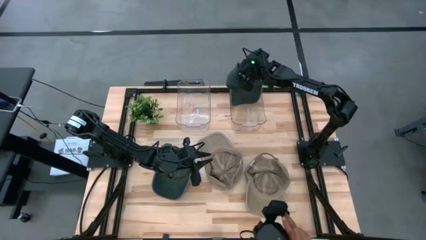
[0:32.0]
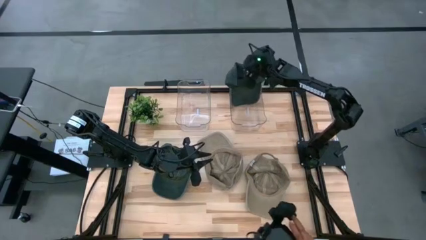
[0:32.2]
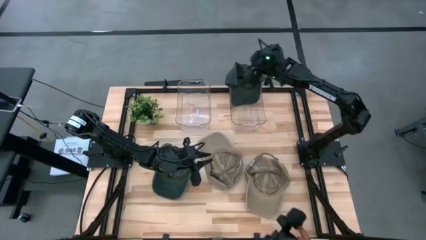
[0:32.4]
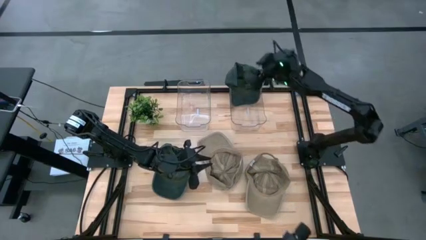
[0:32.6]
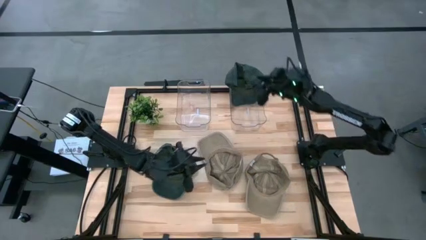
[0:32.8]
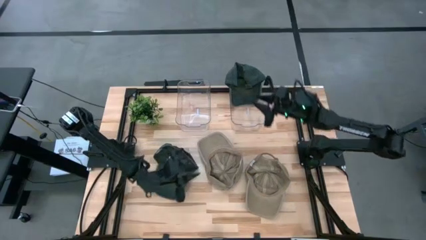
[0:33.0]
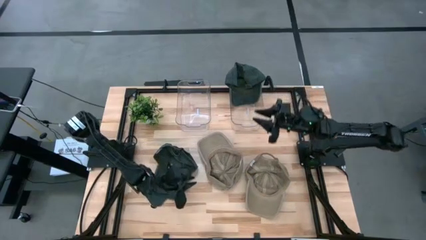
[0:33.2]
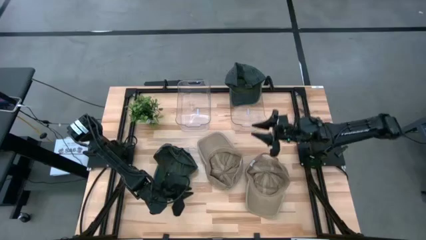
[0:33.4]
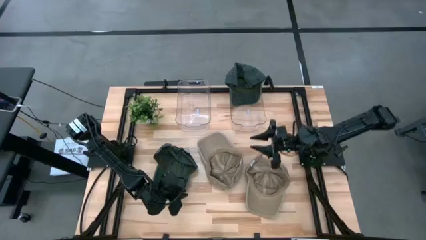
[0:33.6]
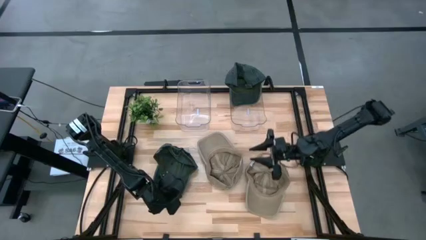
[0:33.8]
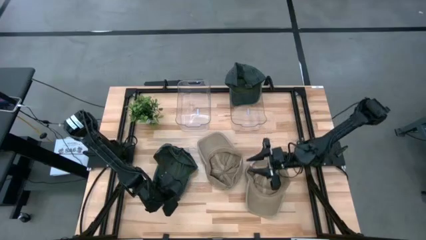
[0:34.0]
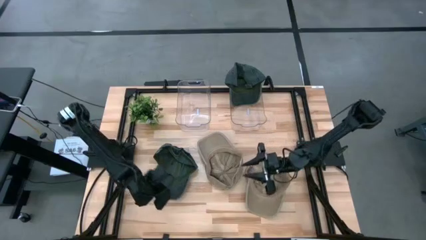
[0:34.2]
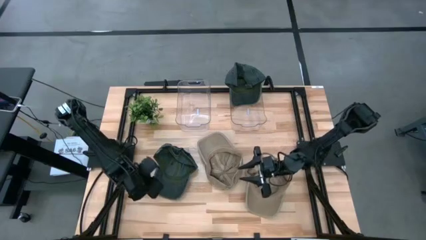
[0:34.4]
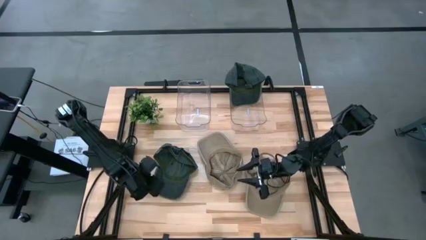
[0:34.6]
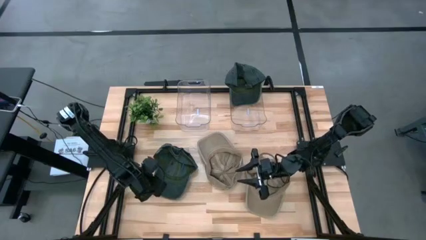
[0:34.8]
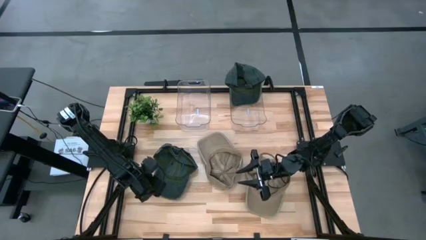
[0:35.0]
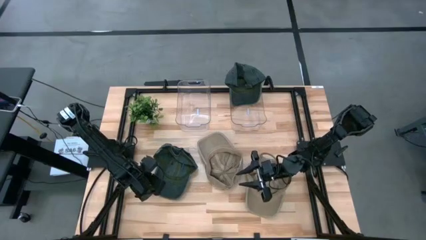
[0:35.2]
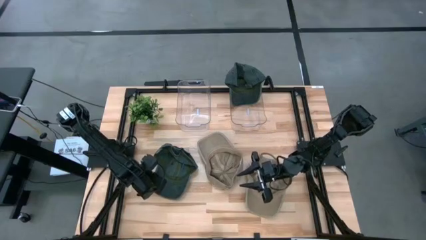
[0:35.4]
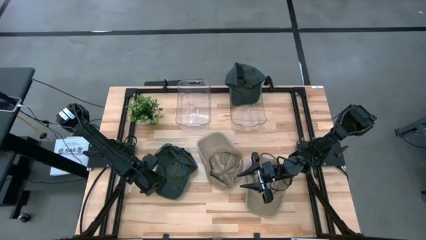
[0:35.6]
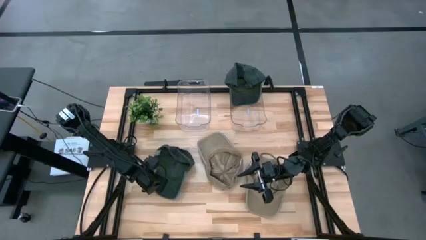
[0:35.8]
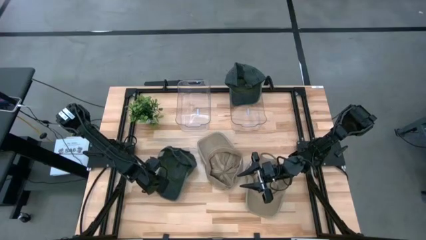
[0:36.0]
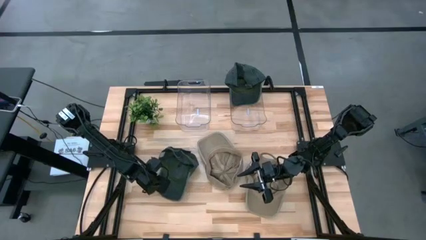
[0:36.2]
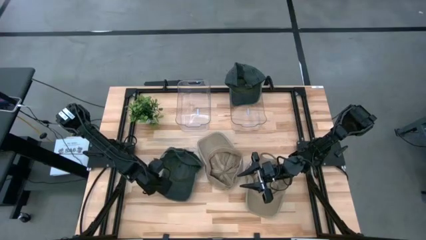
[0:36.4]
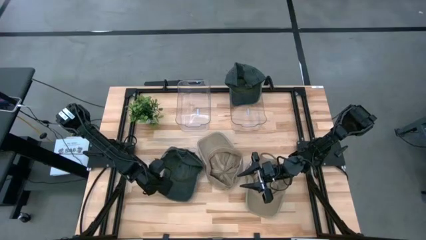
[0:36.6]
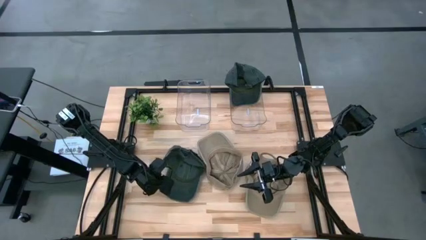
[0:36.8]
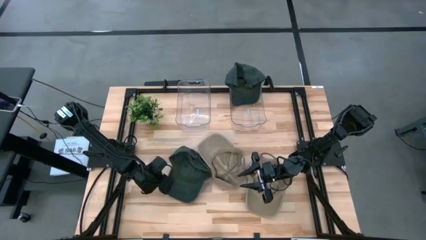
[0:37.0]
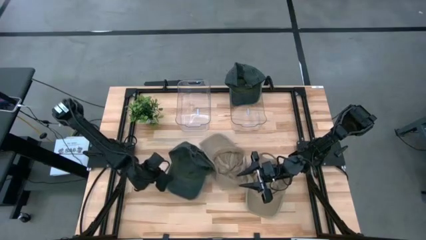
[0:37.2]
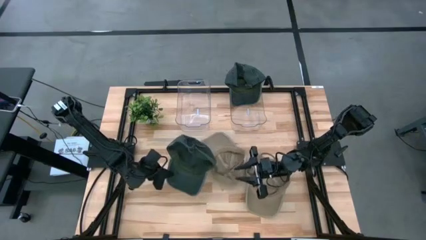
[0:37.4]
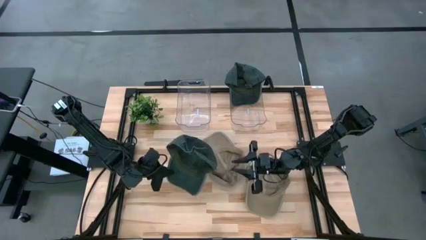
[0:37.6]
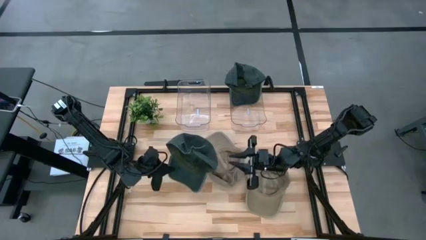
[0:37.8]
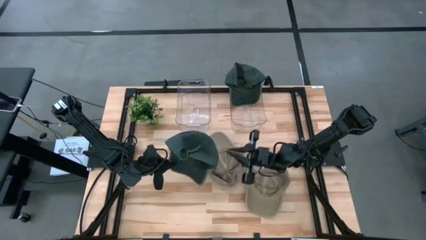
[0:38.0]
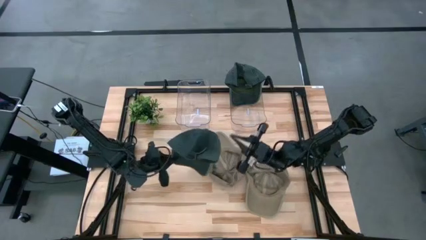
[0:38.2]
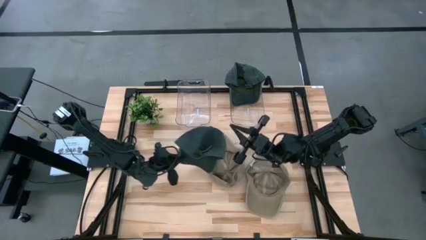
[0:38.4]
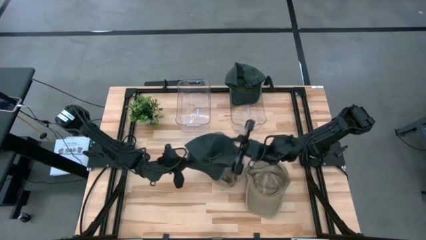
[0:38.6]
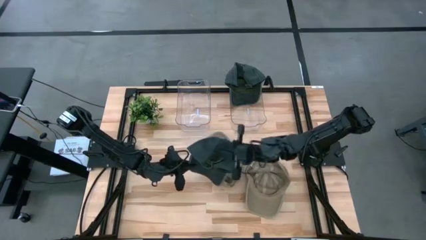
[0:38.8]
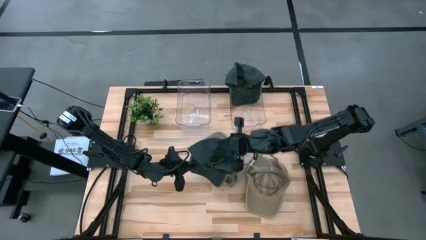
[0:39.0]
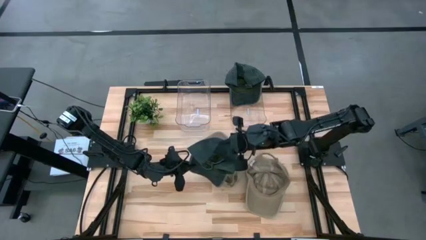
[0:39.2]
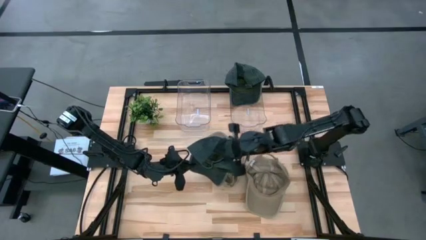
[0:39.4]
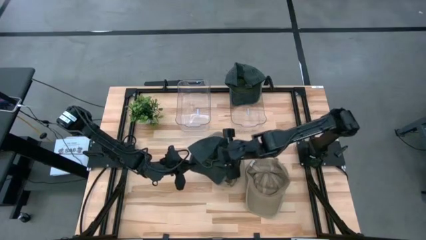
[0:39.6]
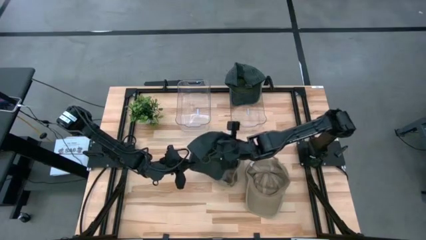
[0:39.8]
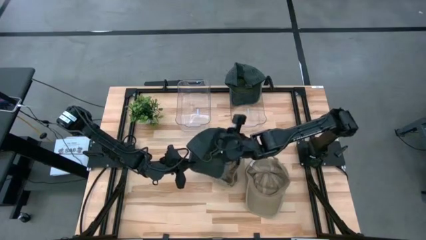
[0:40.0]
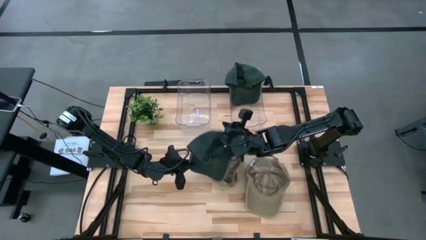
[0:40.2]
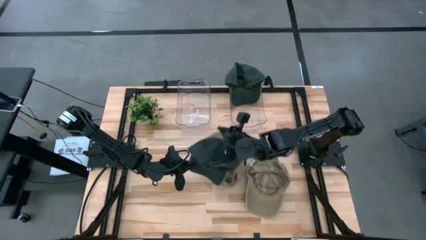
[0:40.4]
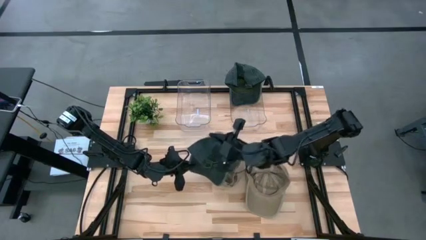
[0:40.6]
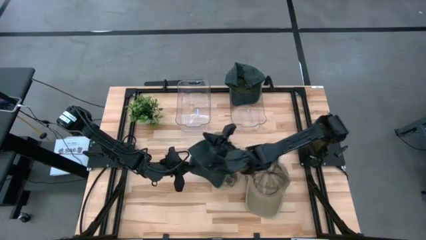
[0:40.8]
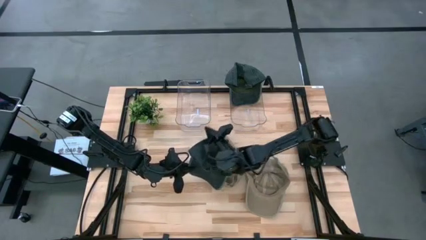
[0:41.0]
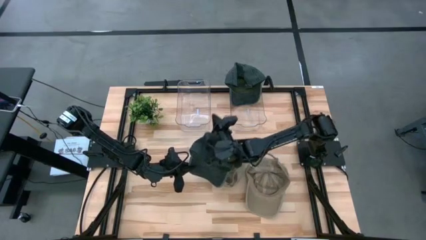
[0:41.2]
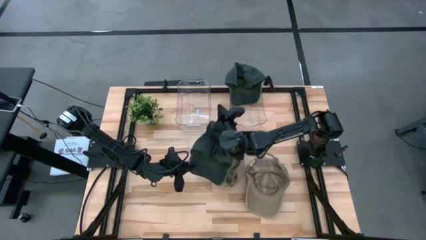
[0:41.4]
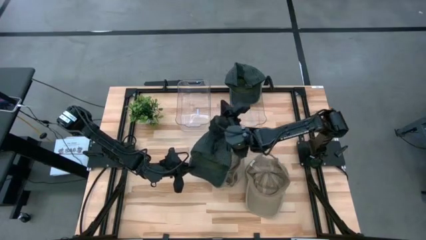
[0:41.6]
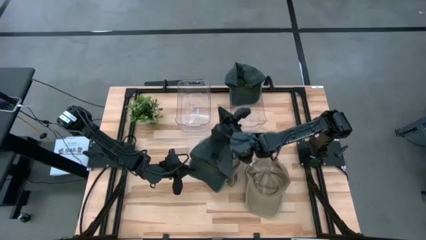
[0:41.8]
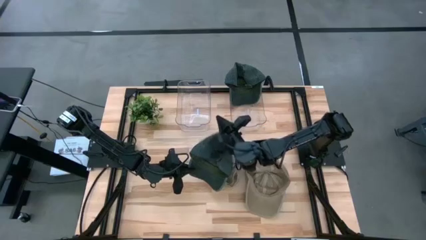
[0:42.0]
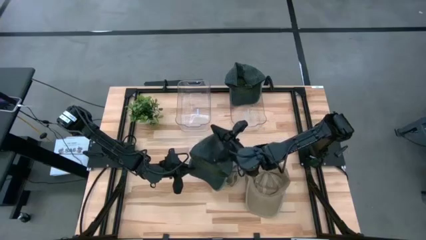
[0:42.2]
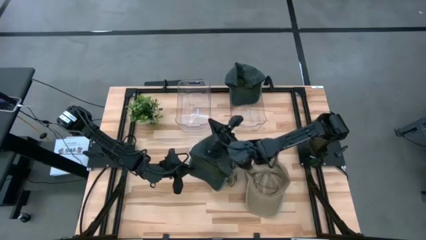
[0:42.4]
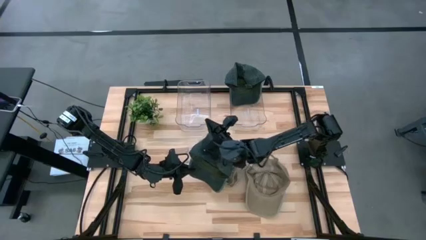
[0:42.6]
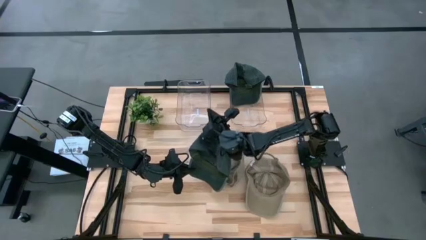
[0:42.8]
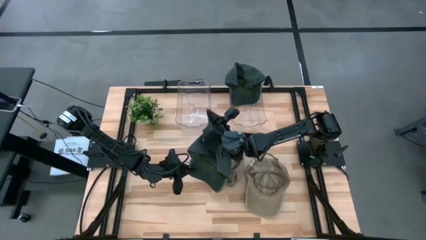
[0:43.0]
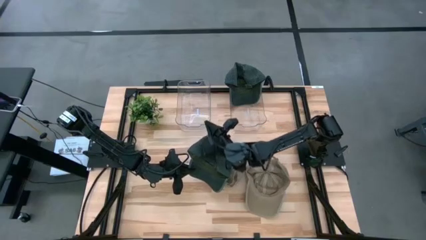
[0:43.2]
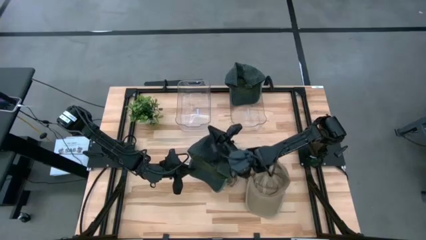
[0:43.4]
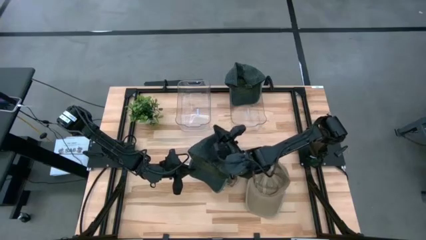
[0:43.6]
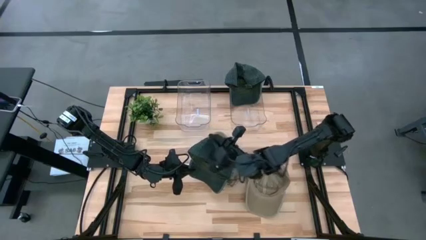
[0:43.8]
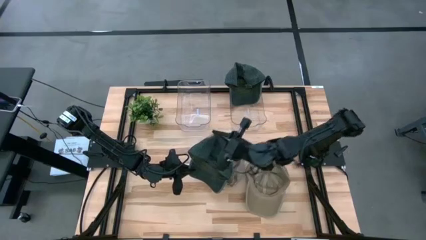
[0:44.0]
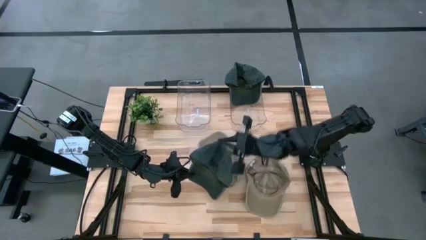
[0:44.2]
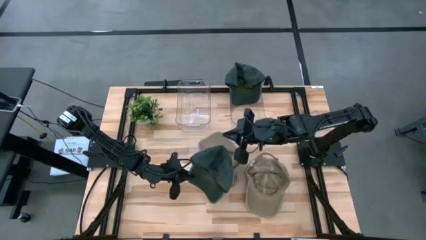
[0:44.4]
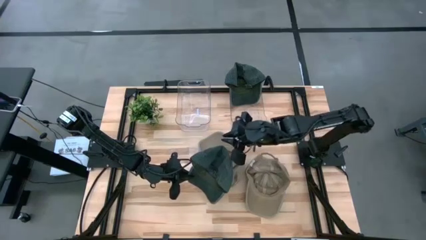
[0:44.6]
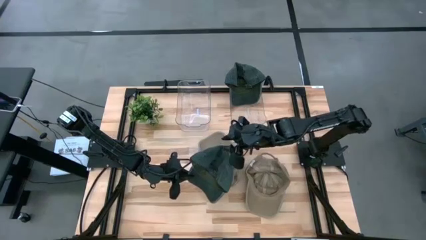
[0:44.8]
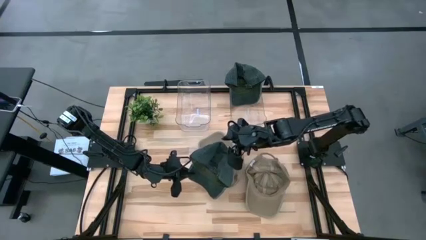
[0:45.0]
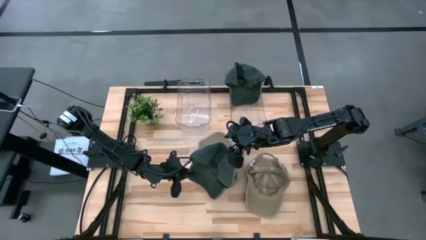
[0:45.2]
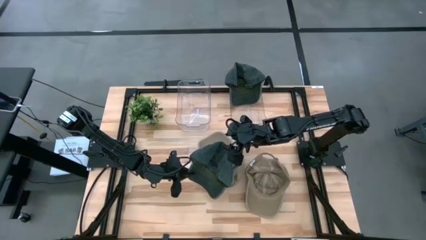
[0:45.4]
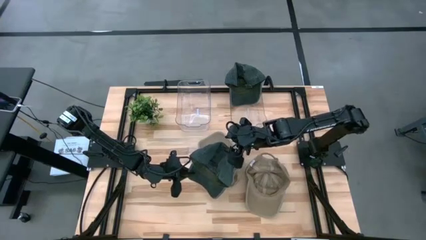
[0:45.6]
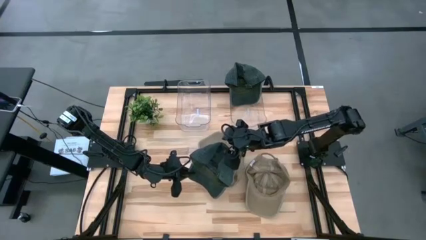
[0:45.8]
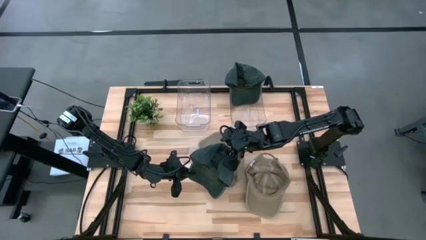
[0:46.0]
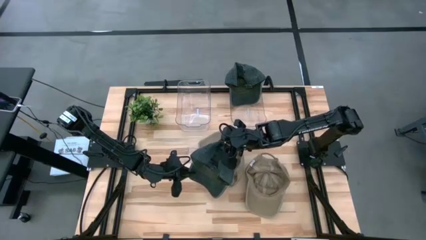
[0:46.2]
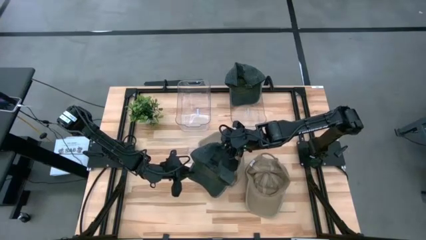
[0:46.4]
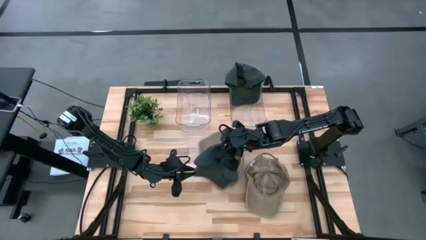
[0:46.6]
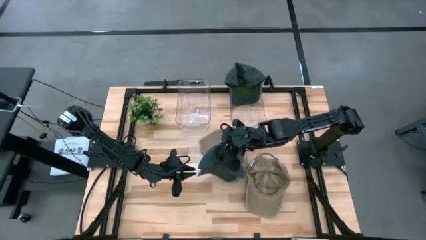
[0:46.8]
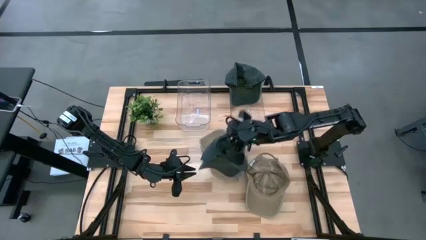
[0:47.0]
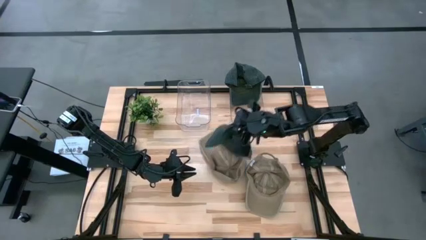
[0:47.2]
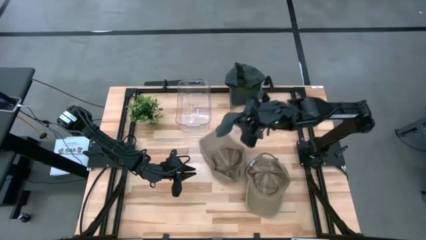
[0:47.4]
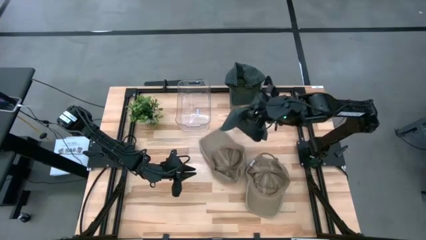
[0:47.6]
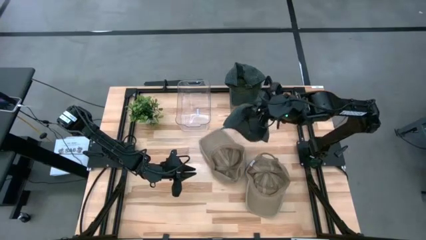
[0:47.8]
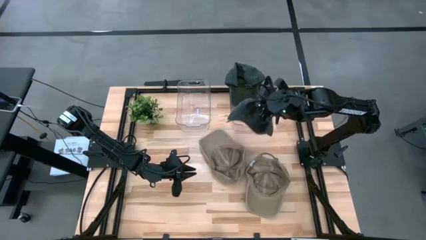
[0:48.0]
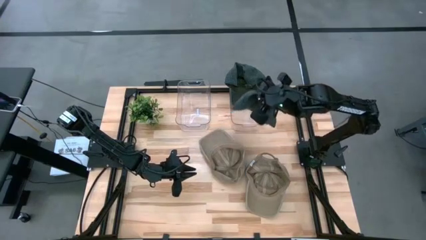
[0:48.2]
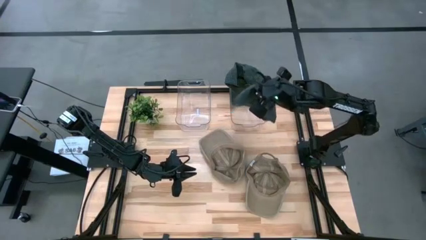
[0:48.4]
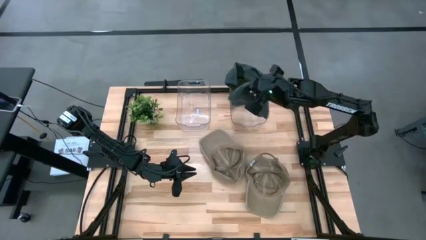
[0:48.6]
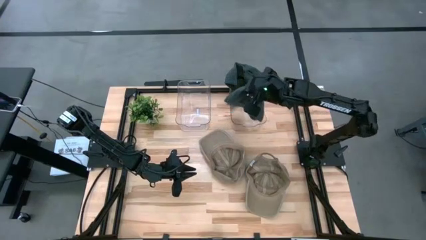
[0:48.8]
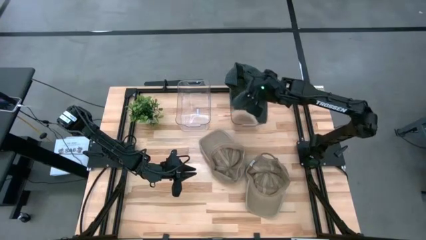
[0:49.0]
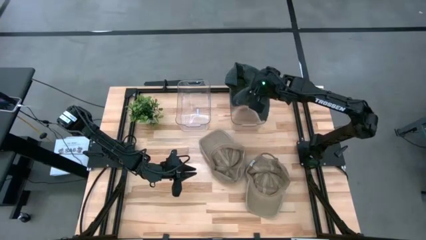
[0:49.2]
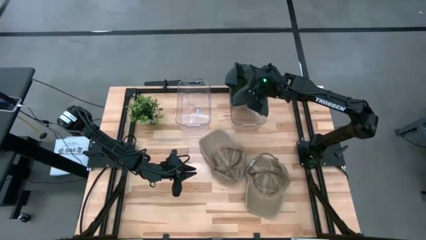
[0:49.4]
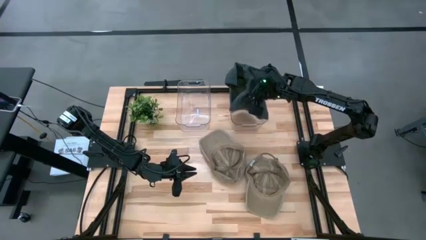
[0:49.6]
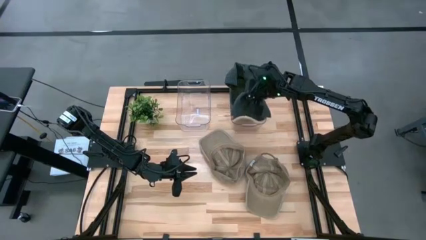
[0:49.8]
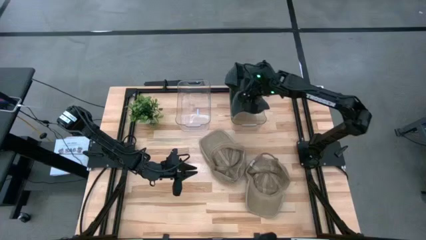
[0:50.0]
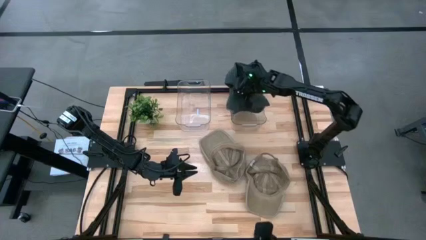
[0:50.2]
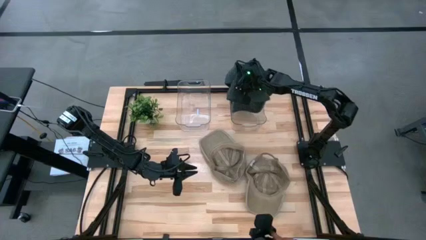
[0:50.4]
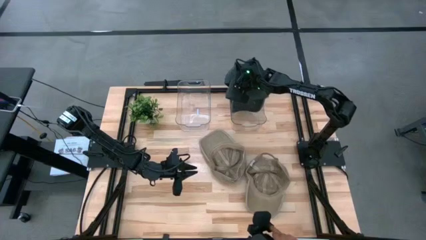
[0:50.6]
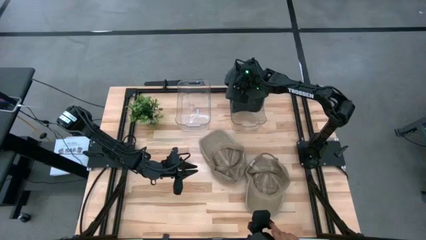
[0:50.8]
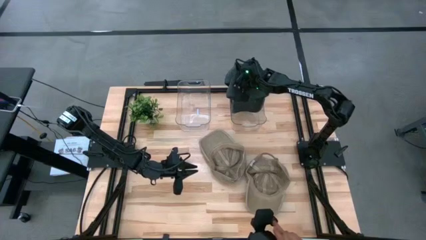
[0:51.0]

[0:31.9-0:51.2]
Task: Pick & Place hat
Put the black cap into the right transparent bin
